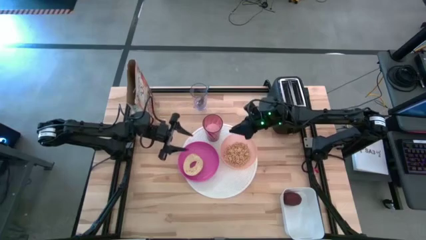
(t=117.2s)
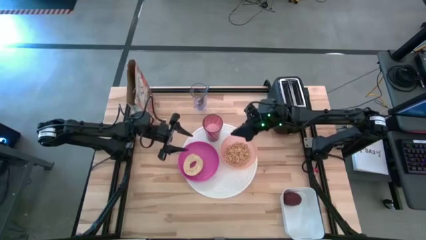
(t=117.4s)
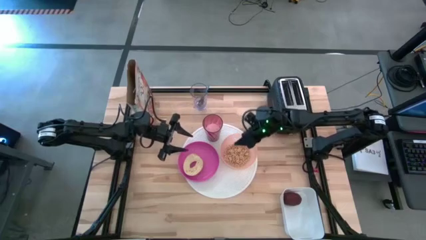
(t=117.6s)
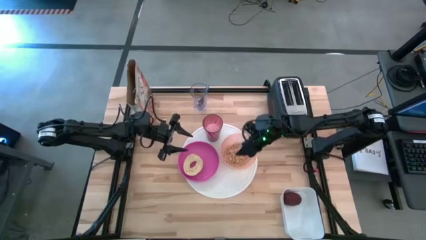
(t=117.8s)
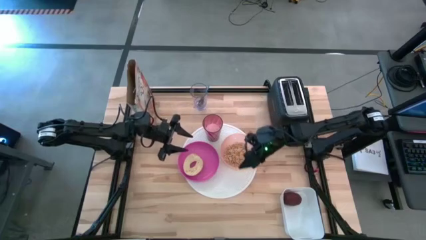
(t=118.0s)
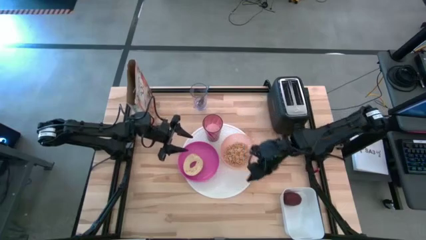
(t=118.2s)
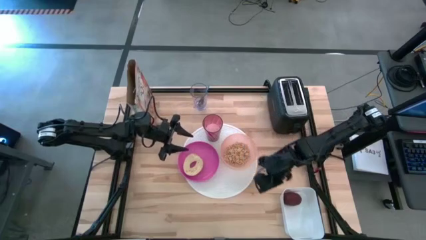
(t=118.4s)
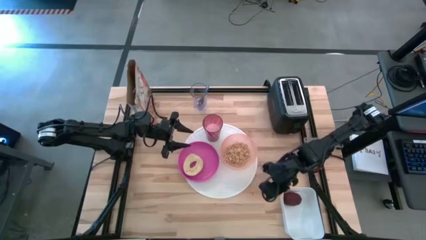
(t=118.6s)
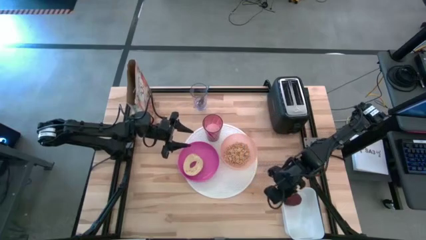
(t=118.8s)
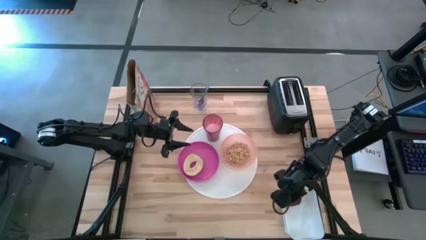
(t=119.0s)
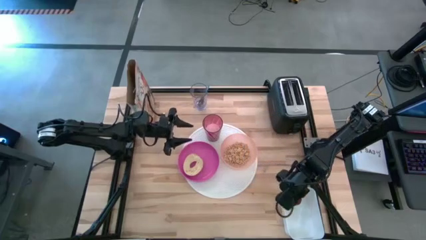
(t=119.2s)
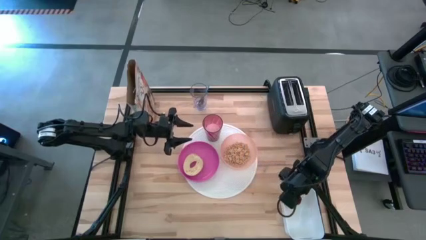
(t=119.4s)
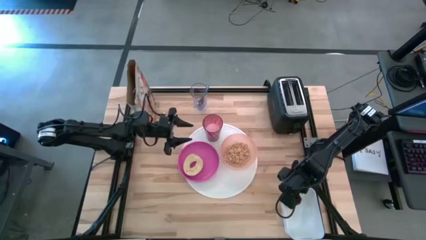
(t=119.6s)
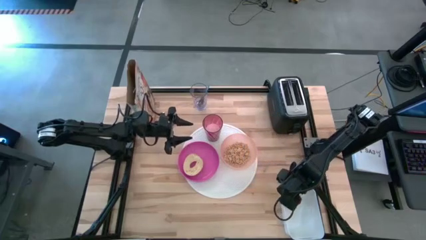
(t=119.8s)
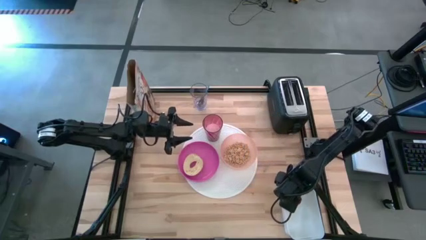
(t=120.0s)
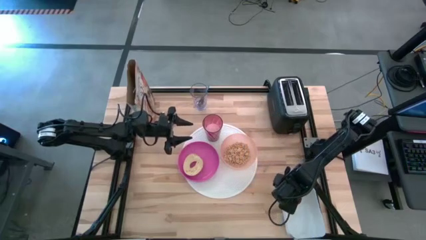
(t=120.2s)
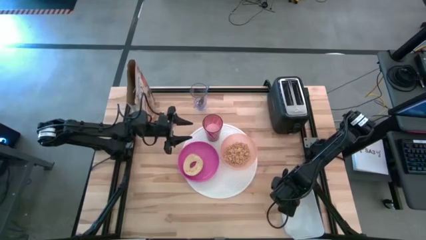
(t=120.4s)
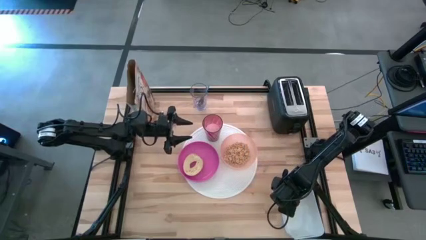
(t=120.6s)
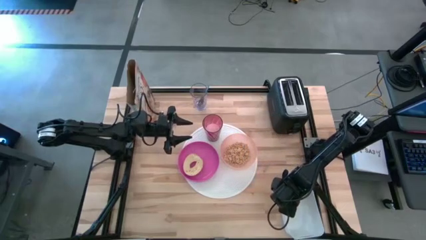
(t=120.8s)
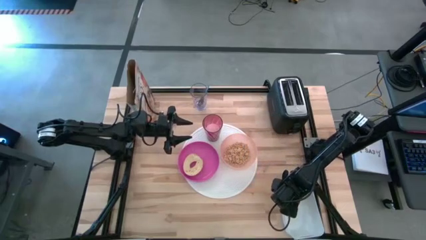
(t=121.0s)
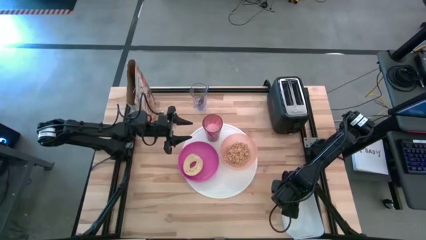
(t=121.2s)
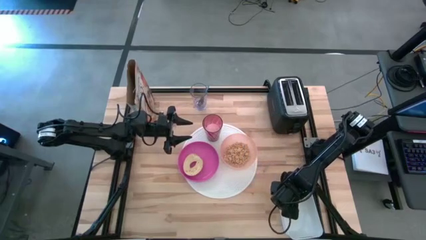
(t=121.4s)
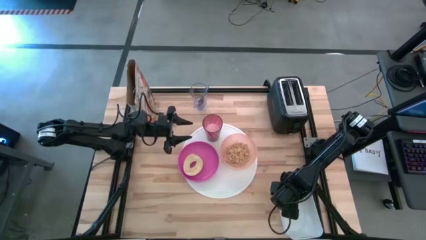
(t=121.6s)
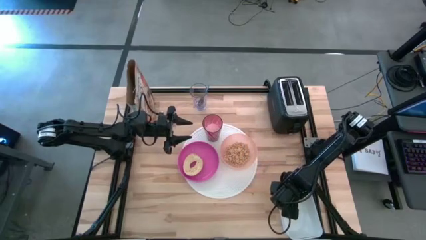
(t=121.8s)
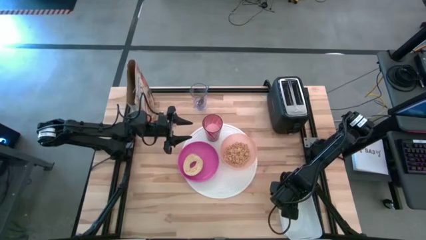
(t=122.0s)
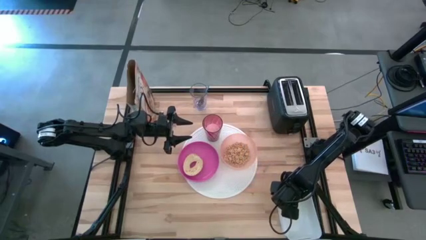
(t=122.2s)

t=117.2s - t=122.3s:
Task: Arrange a breakfast setting
Put the apple beside the red cup on the placemat

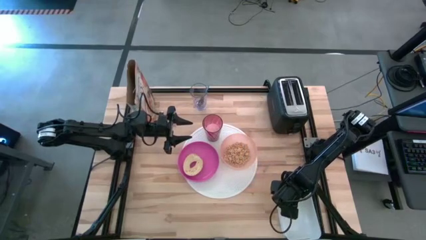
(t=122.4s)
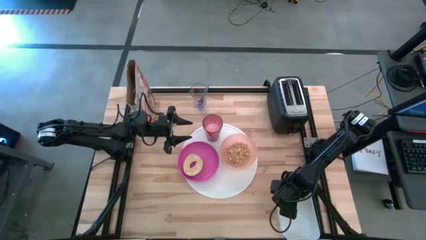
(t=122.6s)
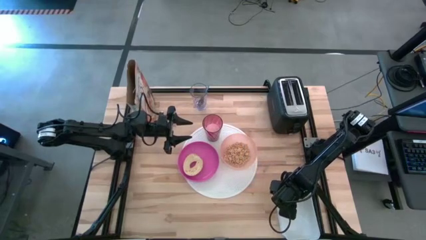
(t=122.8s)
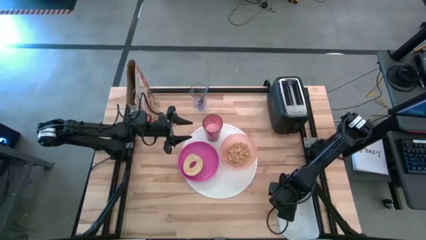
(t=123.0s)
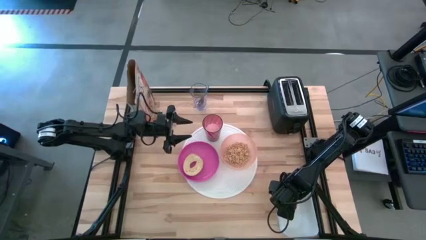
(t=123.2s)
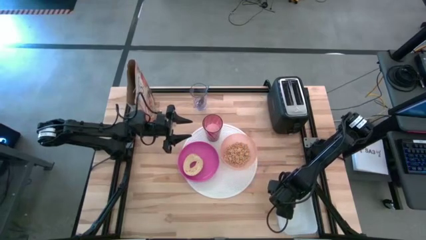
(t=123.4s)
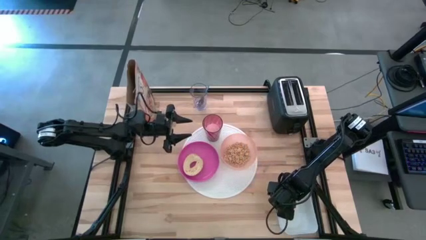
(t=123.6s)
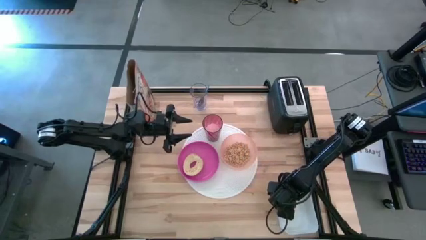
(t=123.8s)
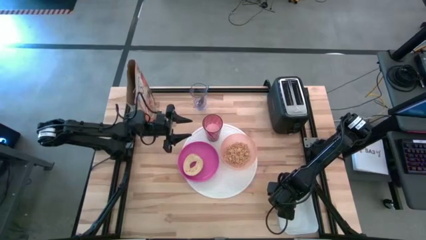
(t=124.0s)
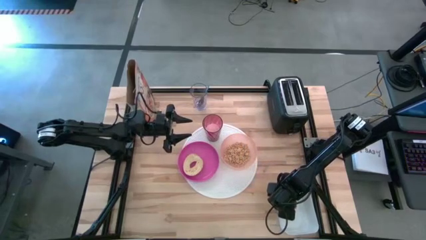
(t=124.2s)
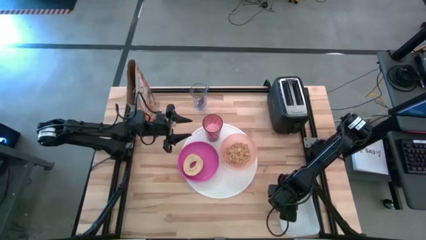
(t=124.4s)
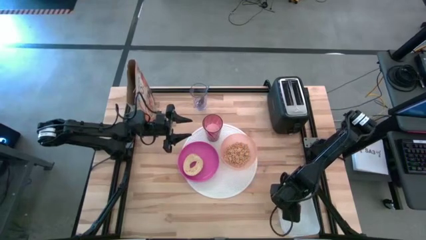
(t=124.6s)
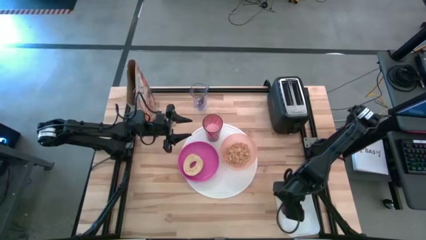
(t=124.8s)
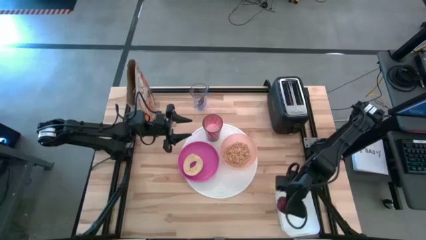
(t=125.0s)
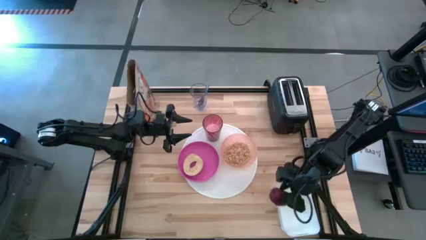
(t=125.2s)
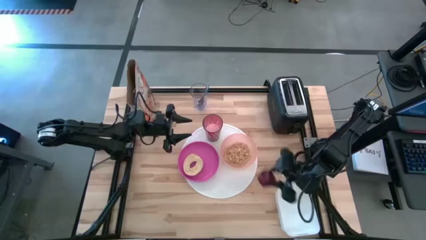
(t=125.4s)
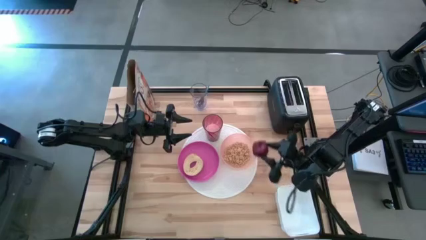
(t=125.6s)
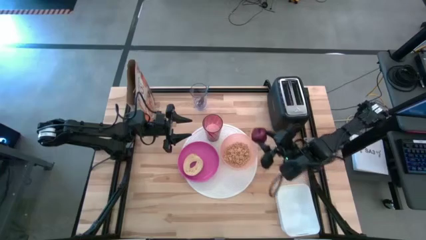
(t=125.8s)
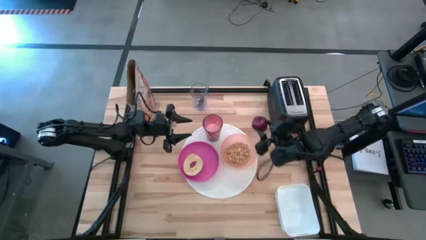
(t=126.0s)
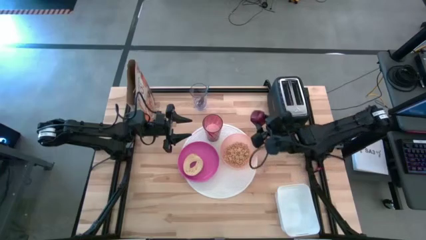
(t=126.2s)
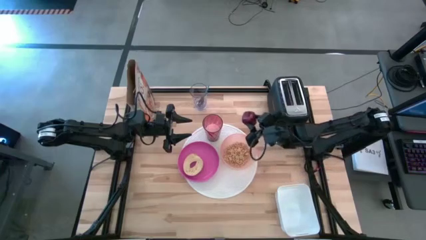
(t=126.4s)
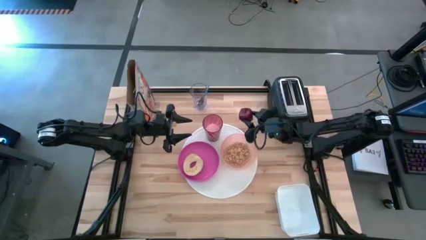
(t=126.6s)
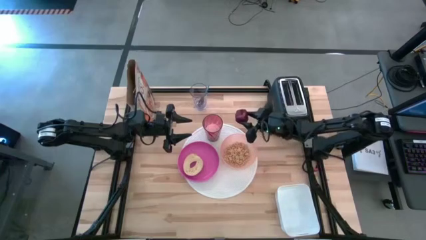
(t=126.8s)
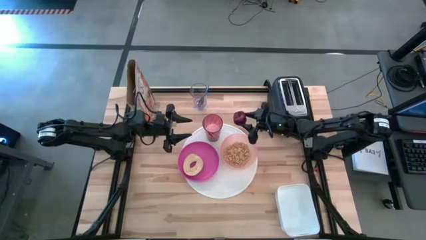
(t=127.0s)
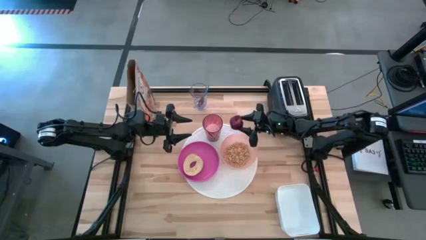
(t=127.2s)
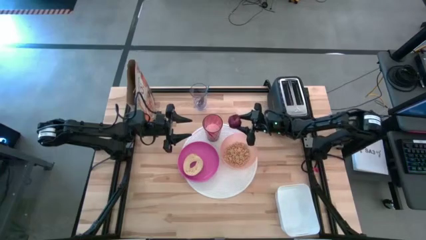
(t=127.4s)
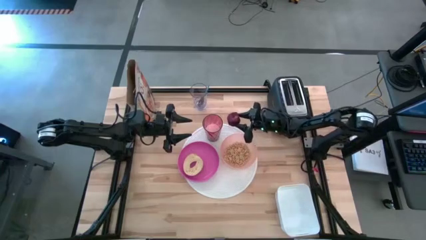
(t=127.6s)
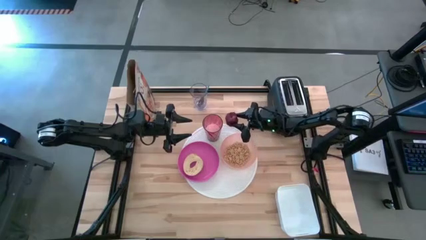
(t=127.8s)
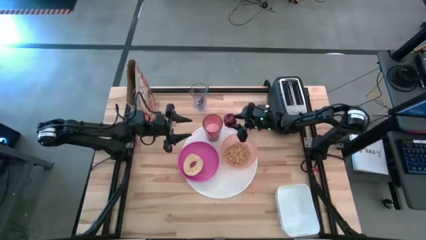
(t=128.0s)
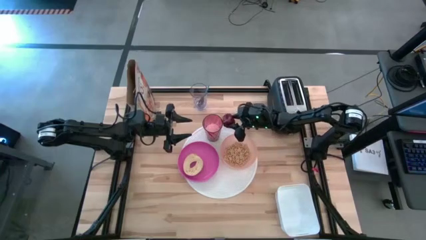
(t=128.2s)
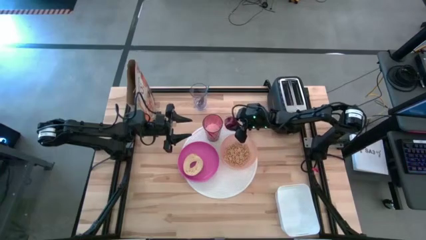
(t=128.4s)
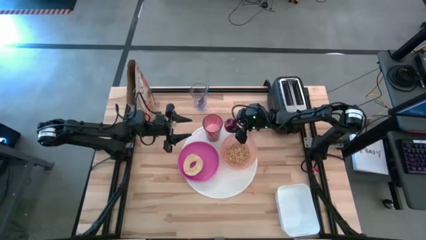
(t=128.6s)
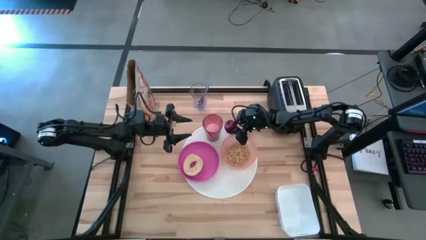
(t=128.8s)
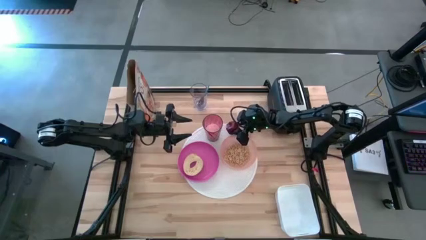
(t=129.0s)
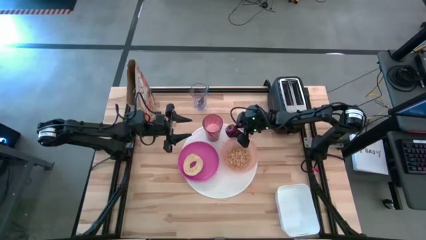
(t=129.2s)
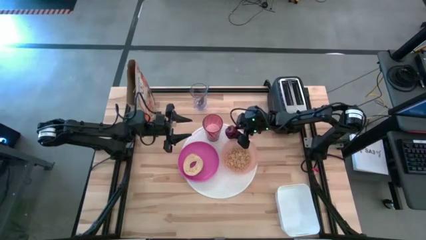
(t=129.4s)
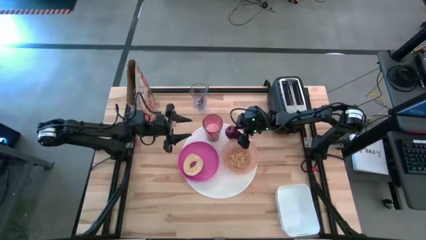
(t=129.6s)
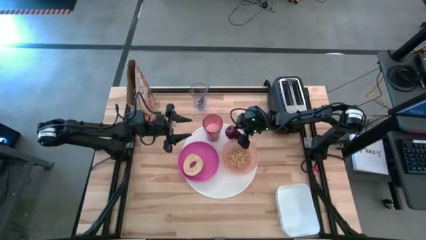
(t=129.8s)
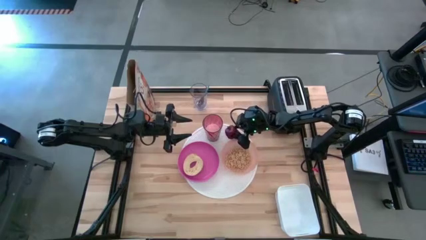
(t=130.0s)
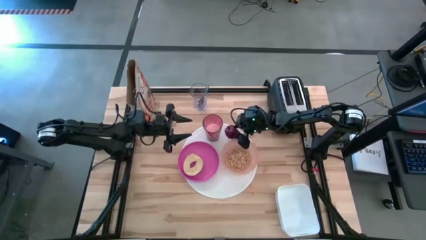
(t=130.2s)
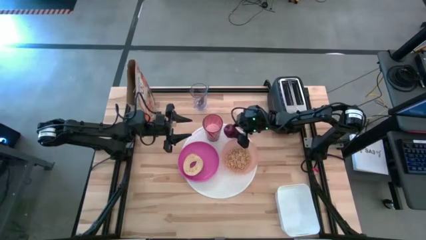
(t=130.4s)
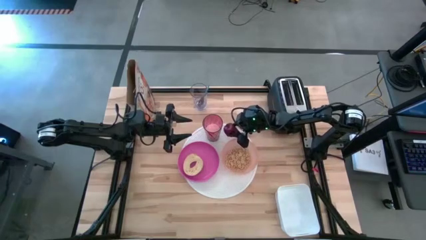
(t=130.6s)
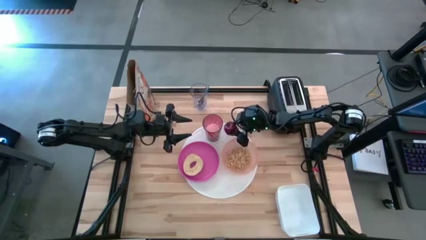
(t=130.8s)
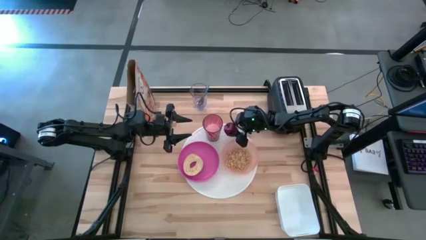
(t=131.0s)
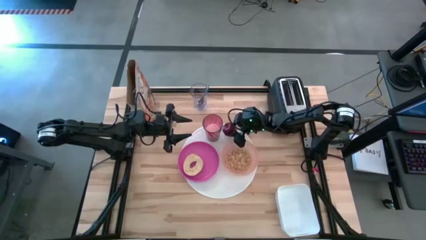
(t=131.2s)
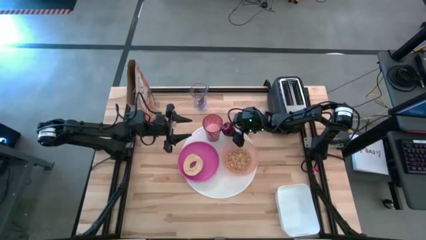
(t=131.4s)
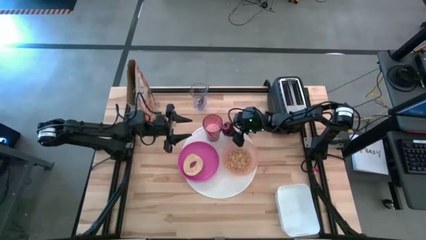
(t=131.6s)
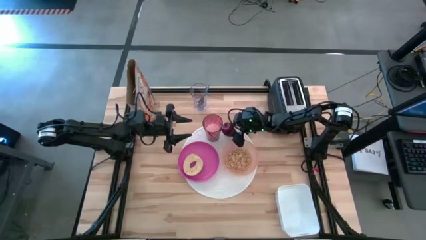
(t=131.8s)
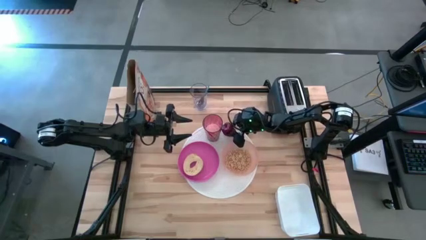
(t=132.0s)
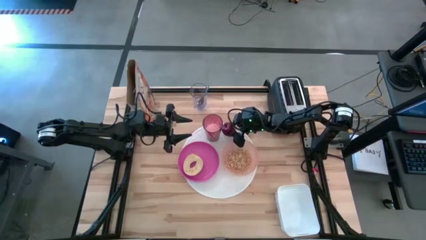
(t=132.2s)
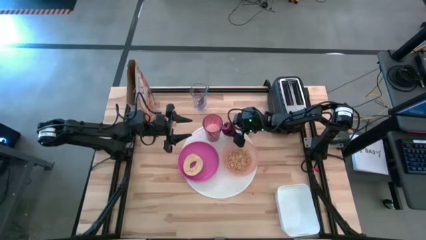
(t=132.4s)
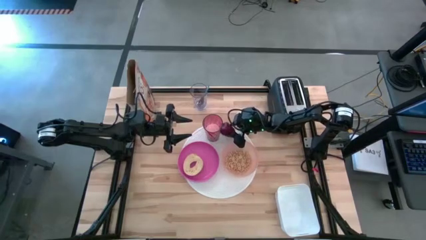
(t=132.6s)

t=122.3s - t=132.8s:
Put the apple beside the red cup on the placemat
